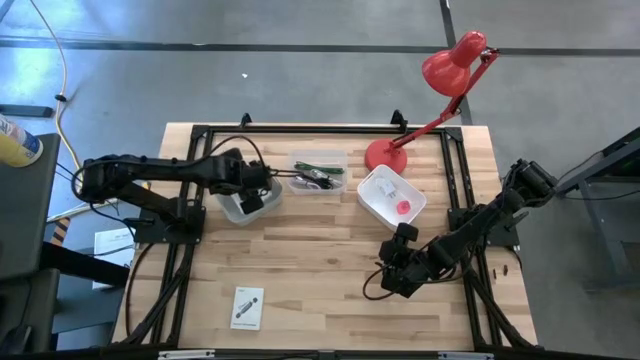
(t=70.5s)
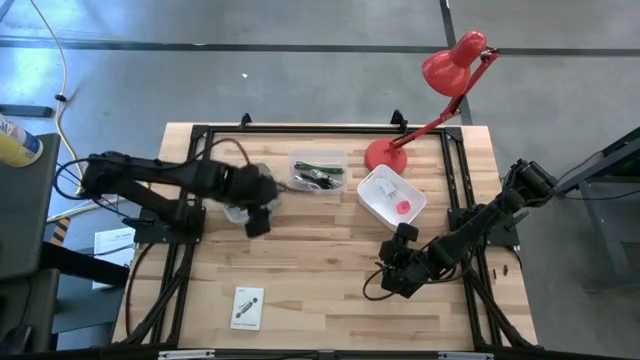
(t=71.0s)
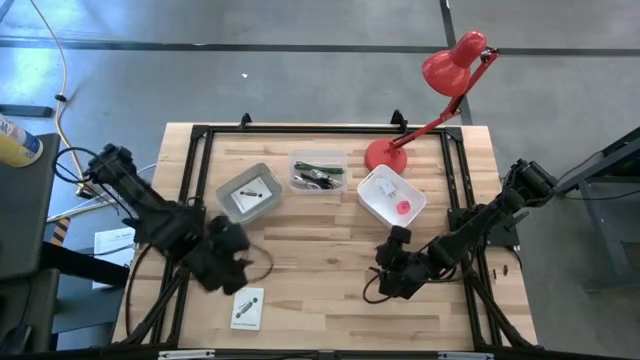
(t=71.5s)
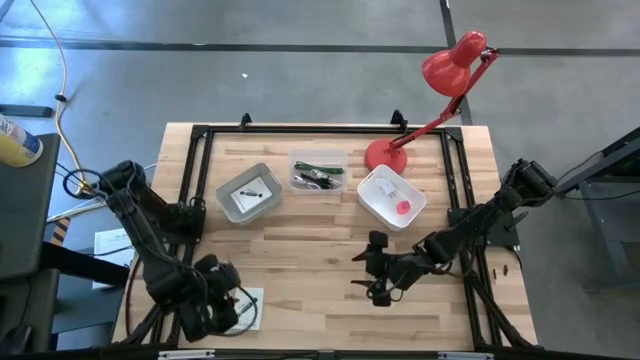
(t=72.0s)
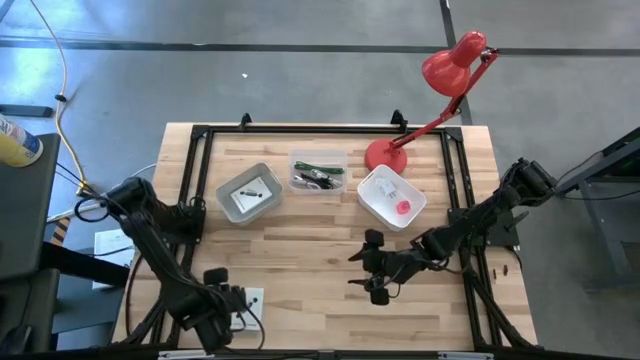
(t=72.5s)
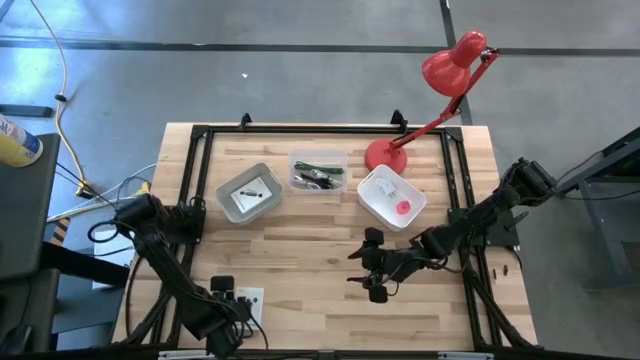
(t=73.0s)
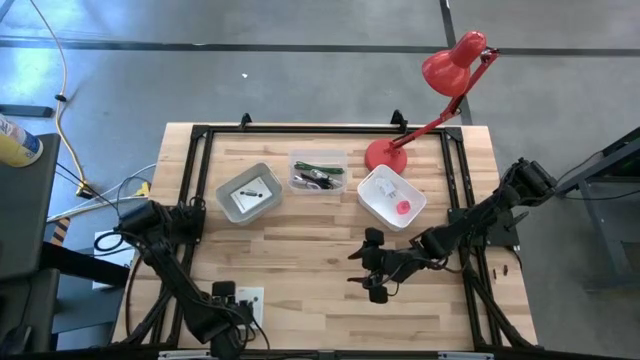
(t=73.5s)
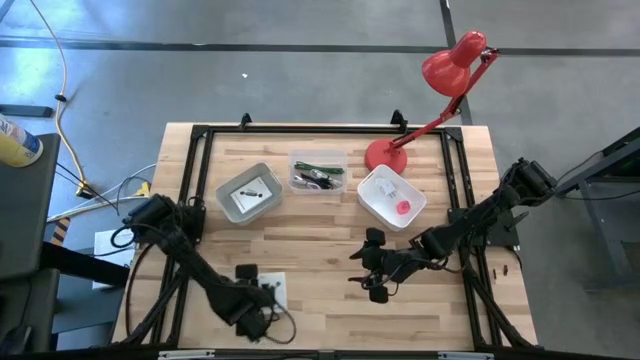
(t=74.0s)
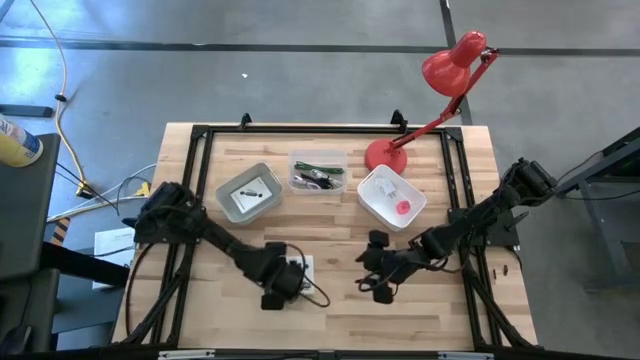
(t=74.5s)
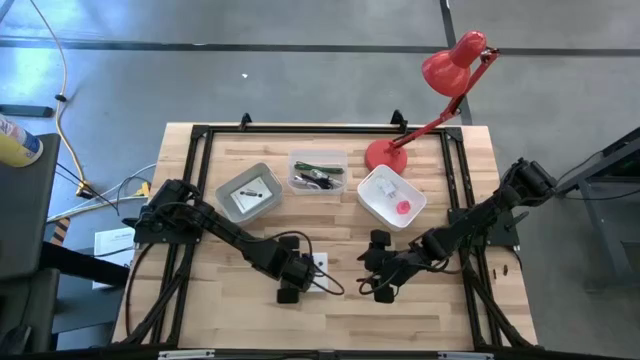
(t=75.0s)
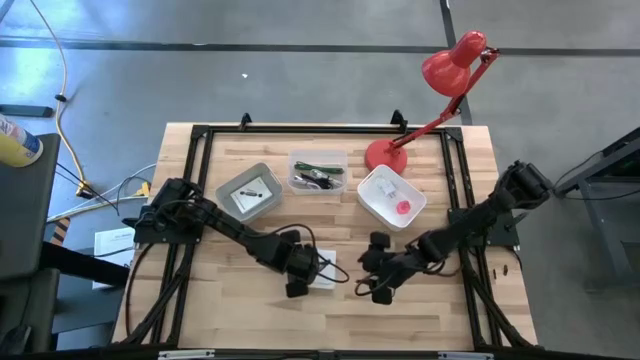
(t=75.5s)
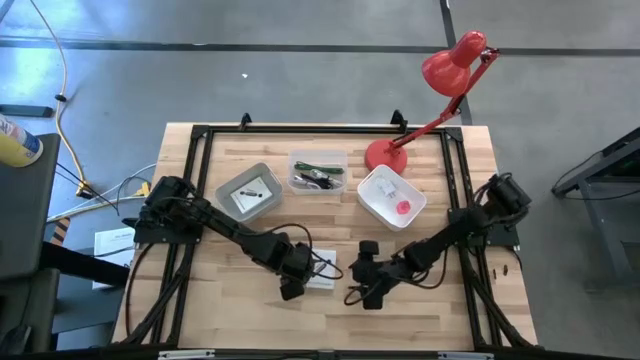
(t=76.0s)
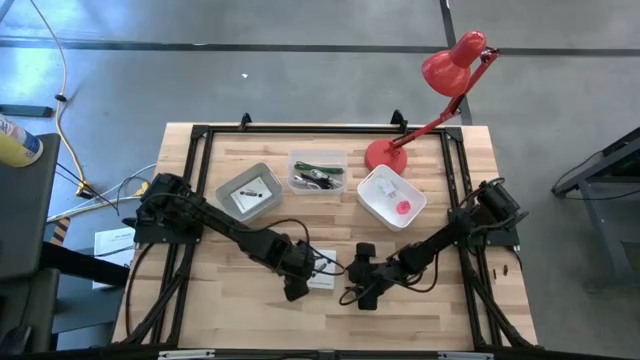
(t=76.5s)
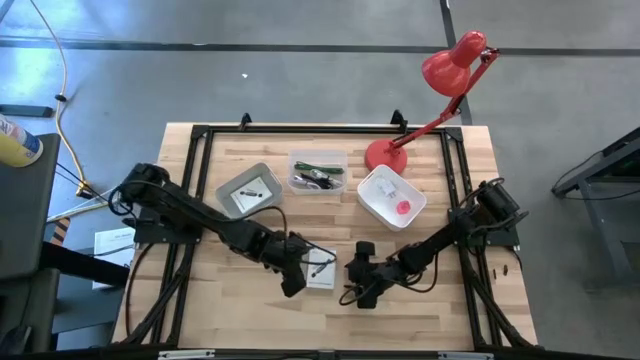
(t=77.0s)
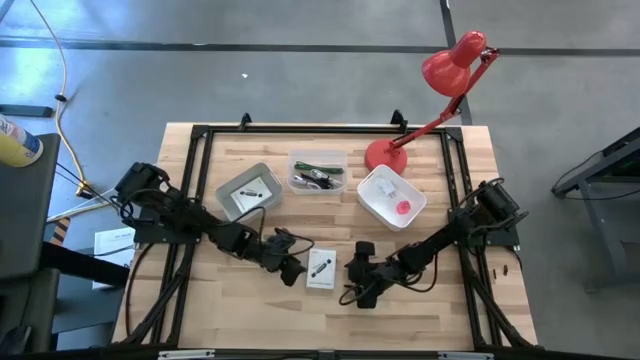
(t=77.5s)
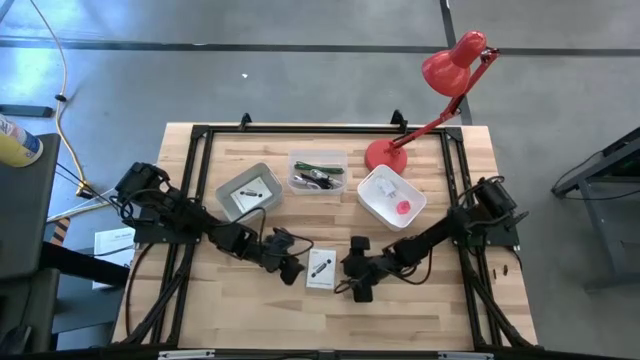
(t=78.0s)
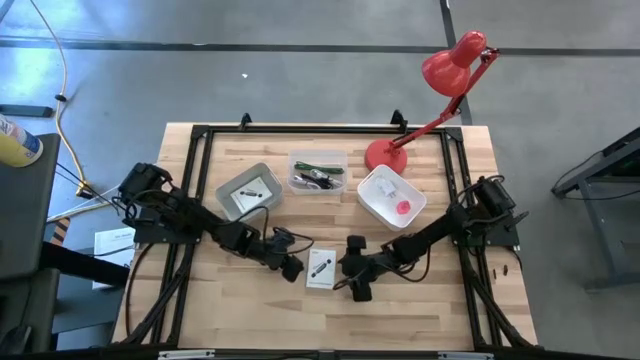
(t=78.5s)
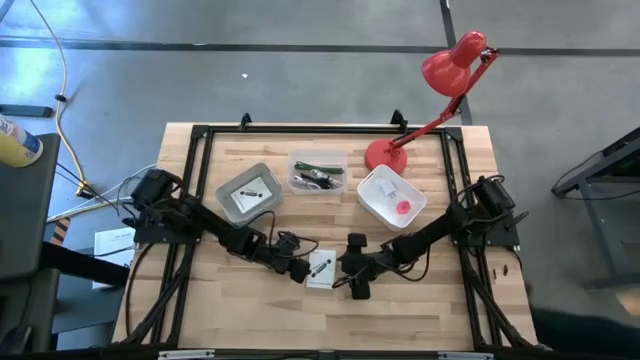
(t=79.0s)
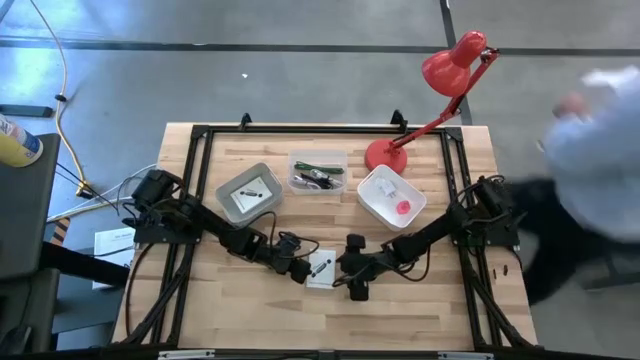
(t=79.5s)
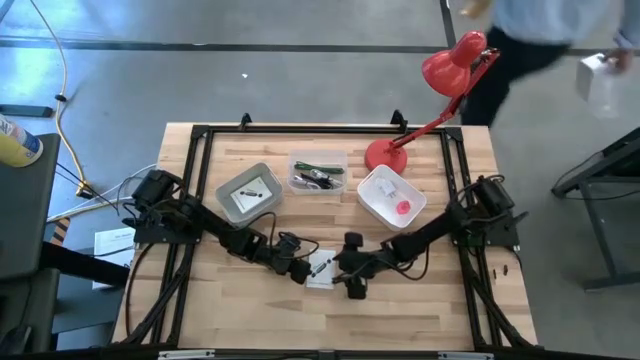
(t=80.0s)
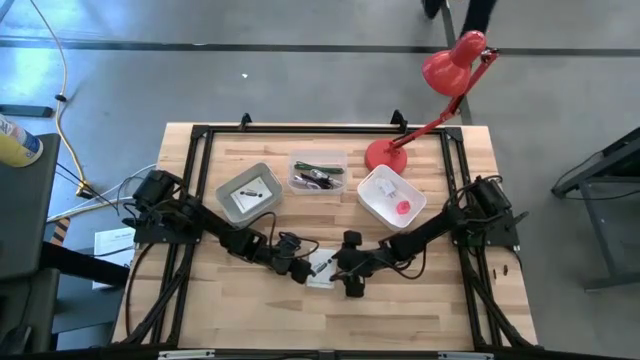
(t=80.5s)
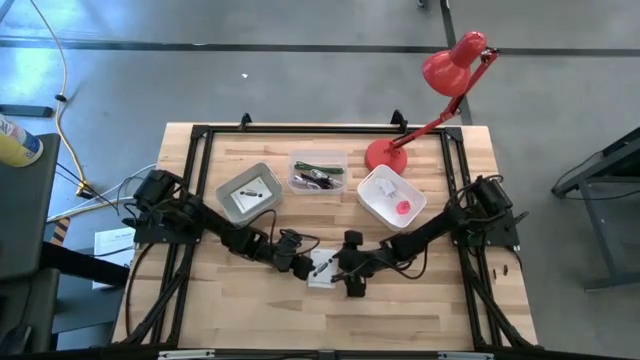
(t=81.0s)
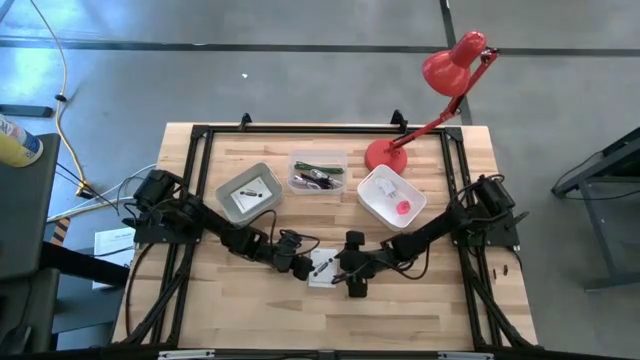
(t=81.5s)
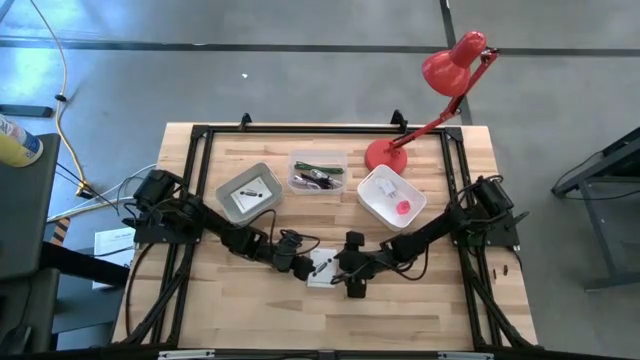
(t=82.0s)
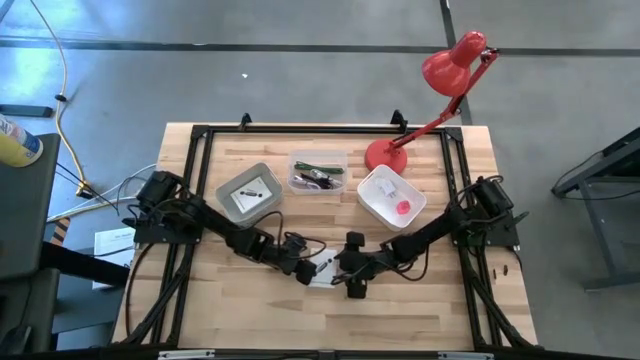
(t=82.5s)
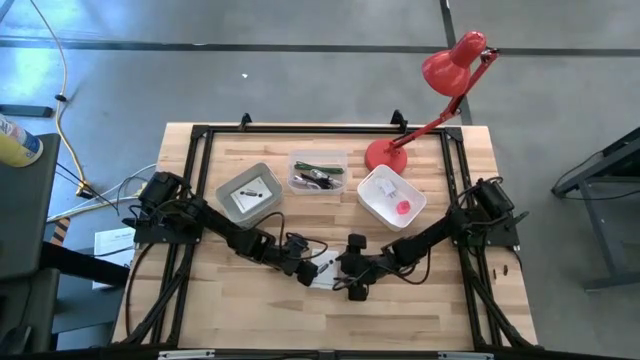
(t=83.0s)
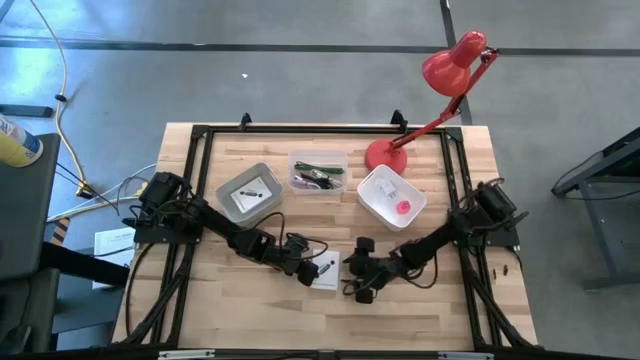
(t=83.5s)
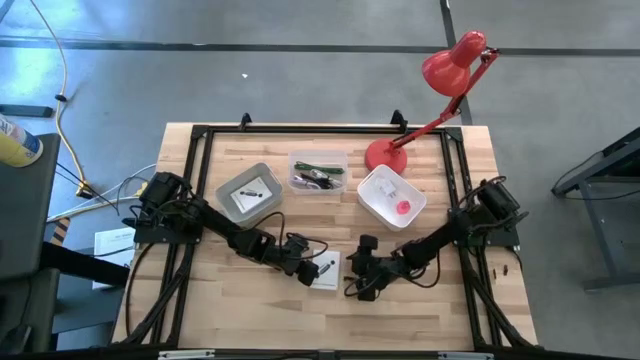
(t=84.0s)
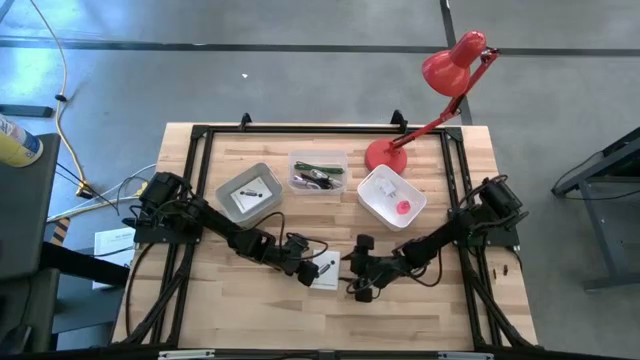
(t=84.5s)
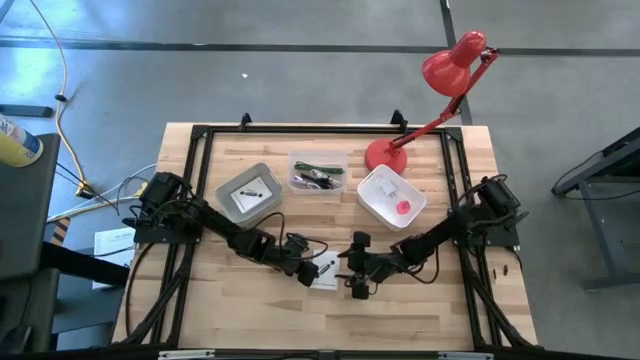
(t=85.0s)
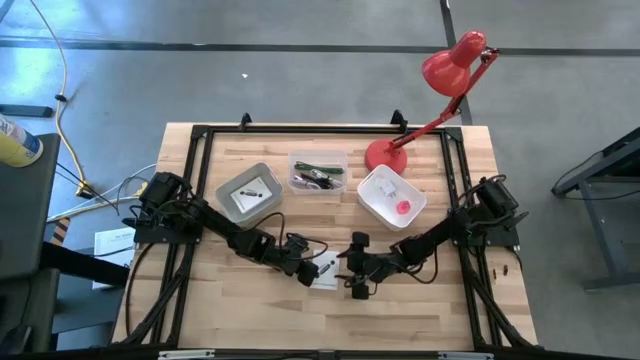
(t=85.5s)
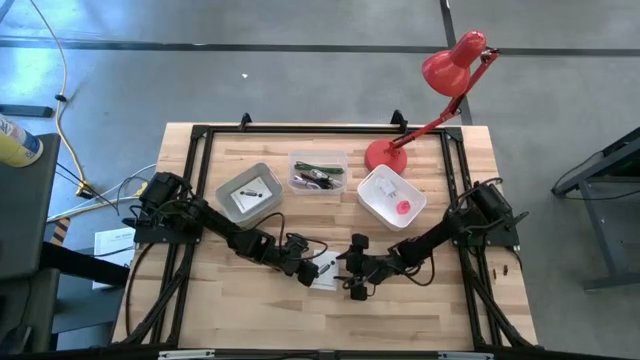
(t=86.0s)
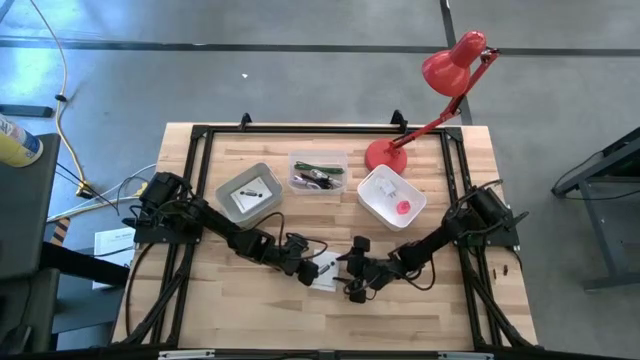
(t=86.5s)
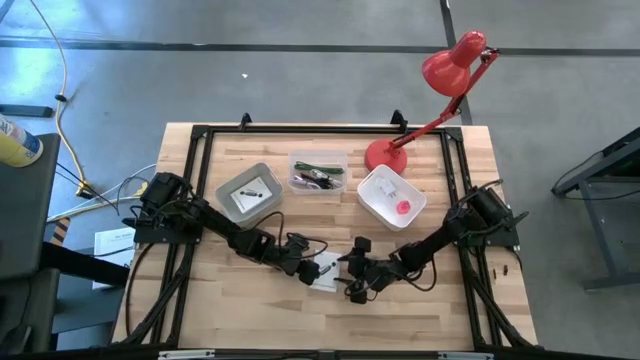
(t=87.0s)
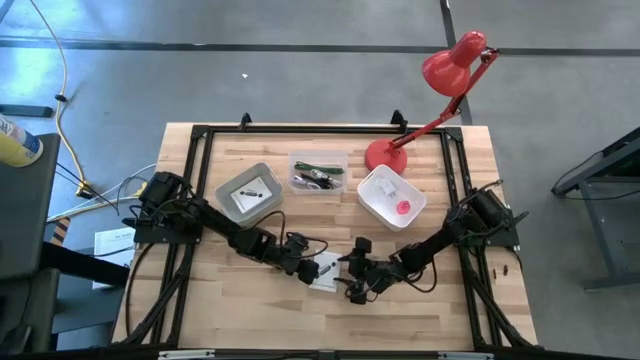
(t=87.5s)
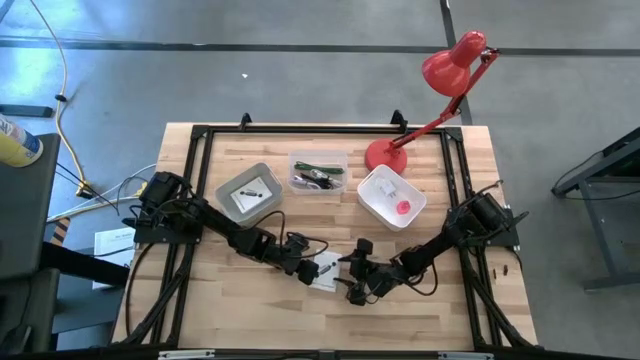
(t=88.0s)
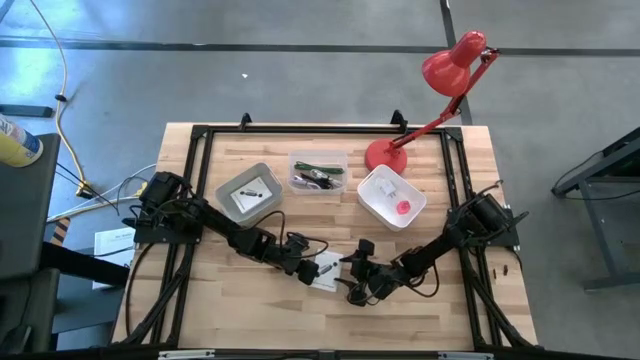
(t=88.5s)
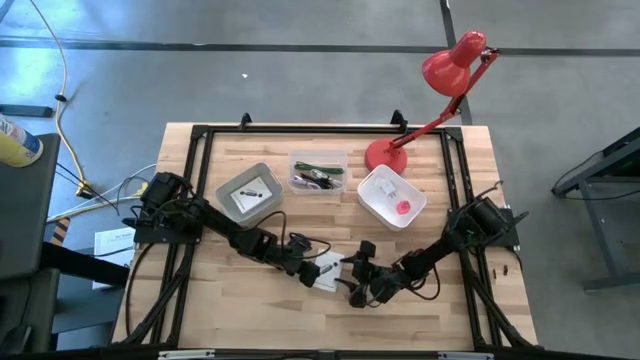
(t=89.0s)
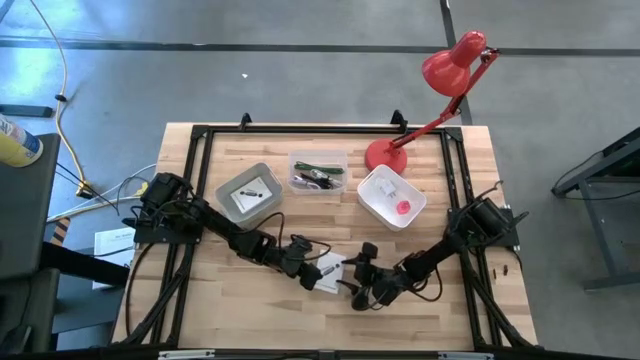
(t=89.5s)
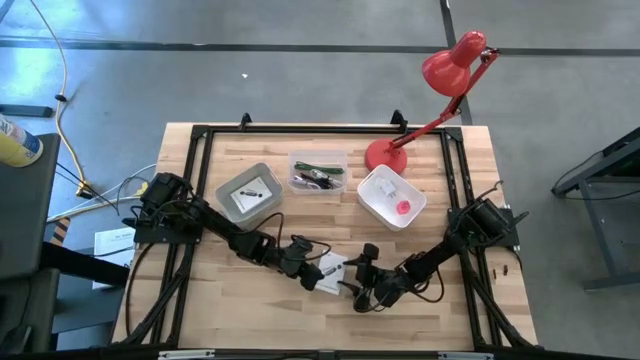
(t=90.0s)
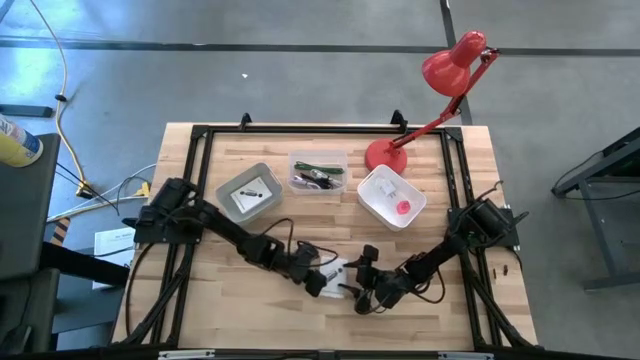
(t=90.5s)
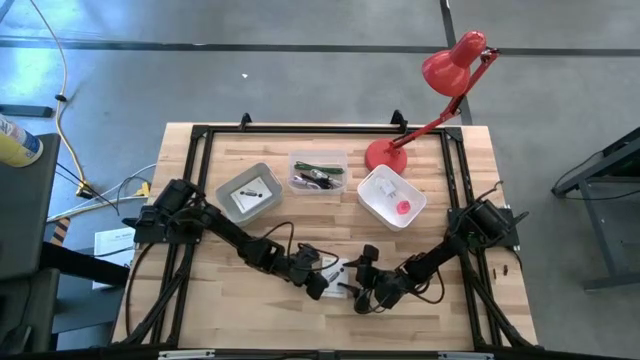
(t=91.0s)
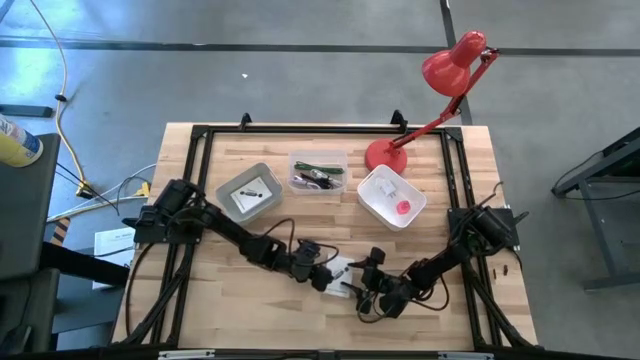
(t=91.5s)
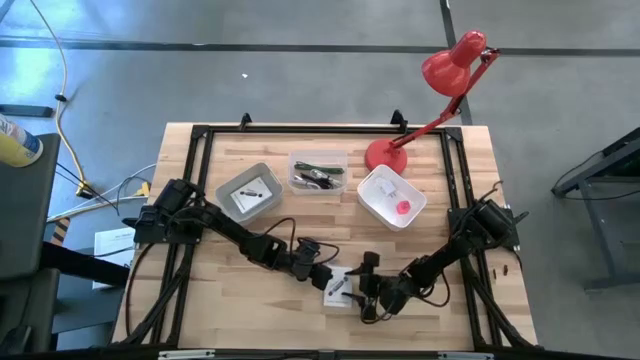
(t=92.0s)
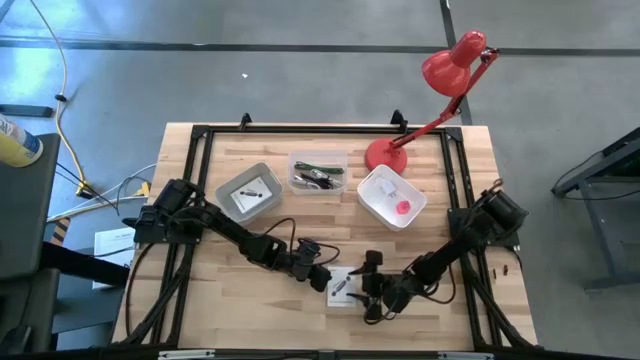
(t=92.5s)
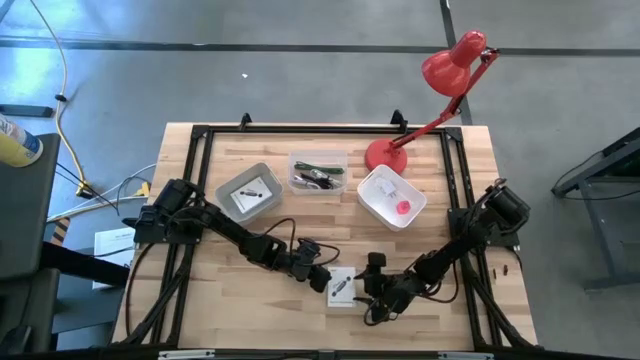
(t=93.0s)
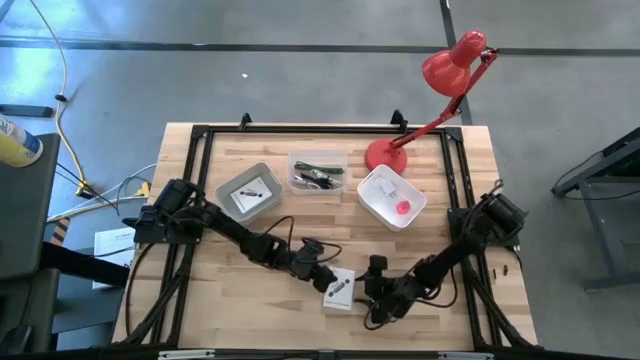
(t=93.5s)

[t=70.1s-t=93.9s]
Task: Pick and place items into bin
Put the card reader box into the gray bin
